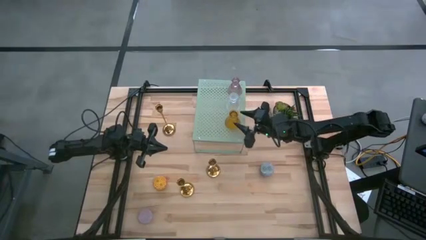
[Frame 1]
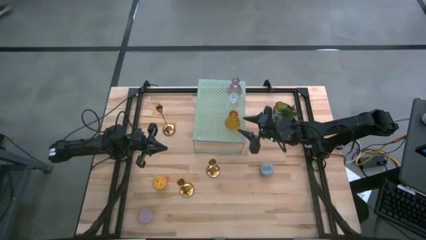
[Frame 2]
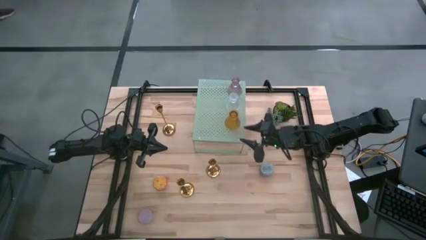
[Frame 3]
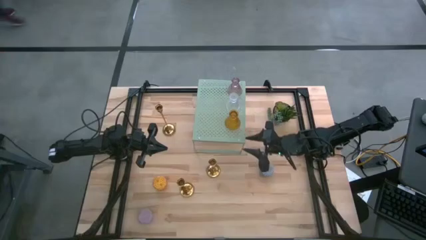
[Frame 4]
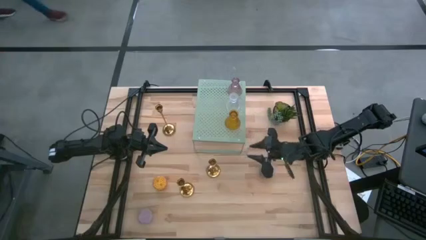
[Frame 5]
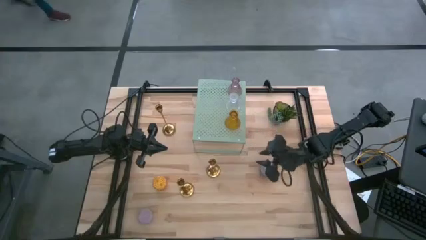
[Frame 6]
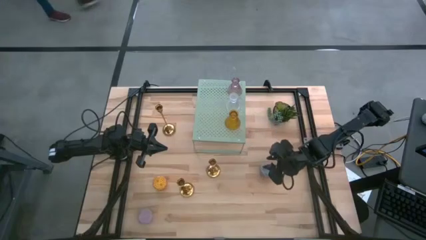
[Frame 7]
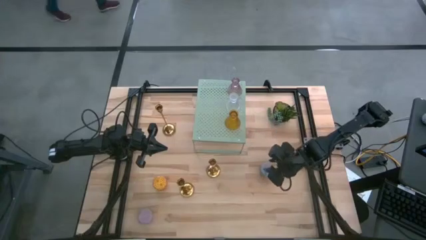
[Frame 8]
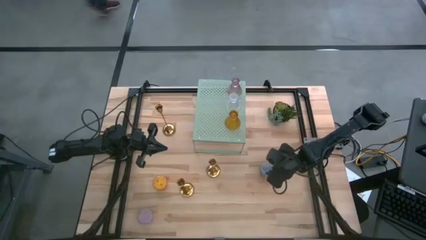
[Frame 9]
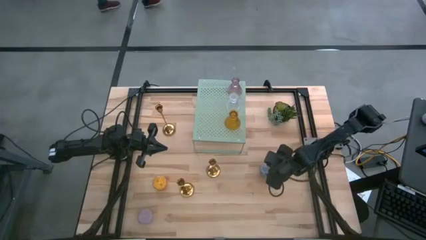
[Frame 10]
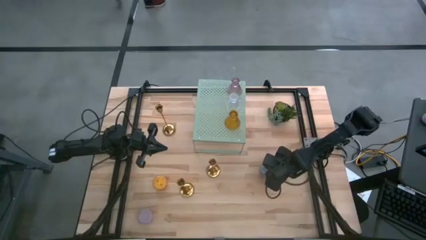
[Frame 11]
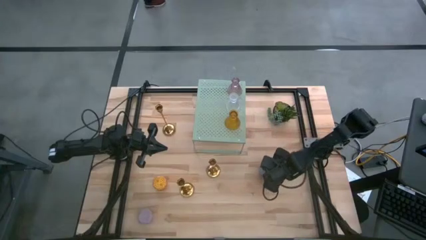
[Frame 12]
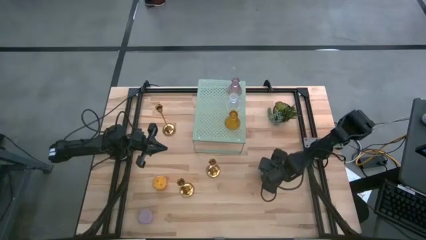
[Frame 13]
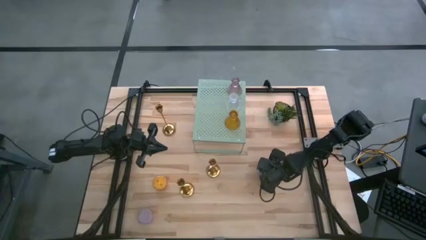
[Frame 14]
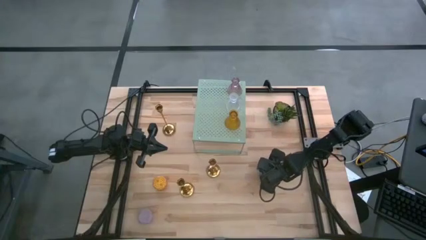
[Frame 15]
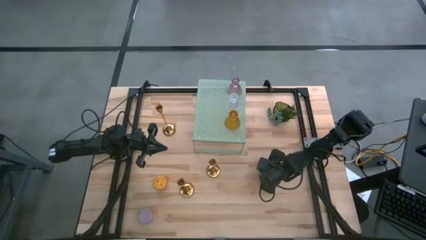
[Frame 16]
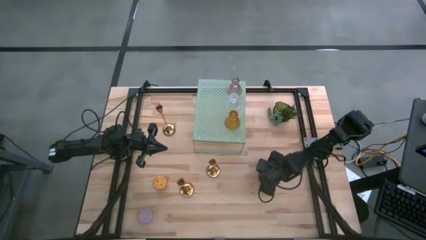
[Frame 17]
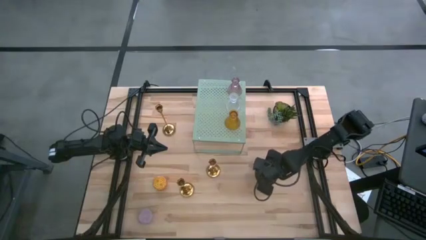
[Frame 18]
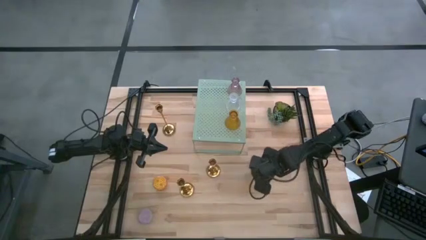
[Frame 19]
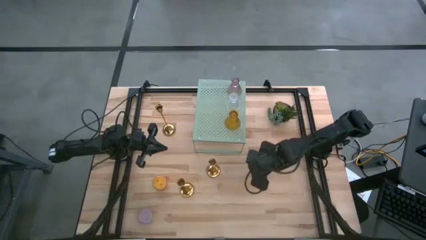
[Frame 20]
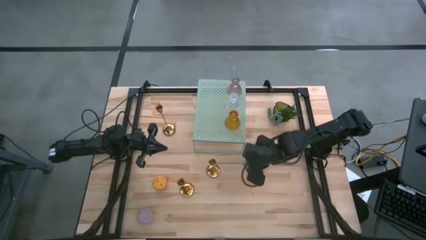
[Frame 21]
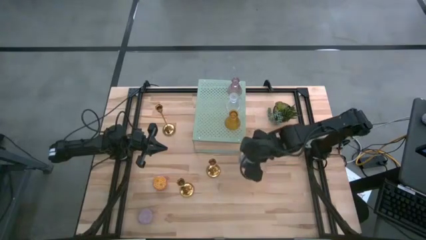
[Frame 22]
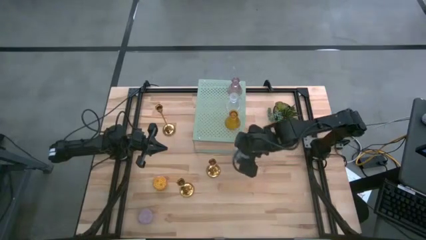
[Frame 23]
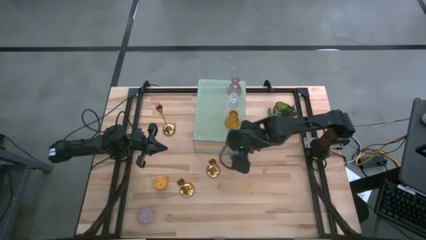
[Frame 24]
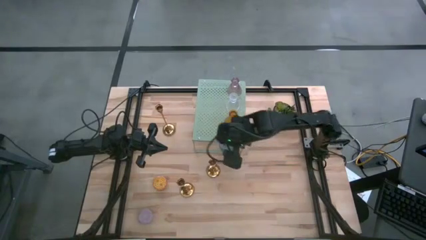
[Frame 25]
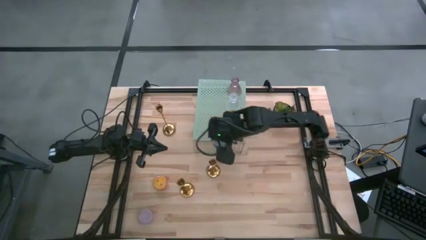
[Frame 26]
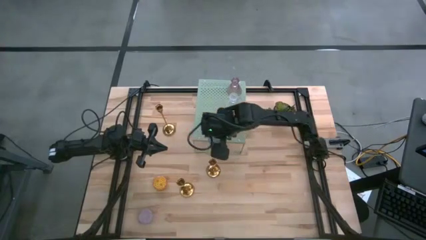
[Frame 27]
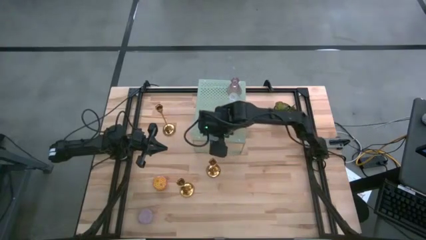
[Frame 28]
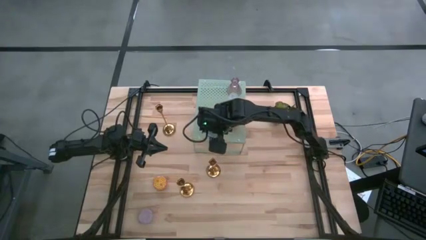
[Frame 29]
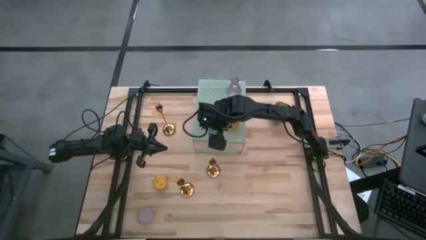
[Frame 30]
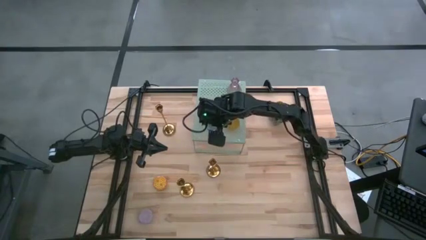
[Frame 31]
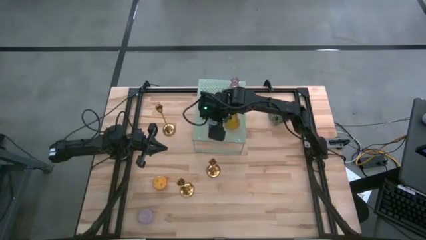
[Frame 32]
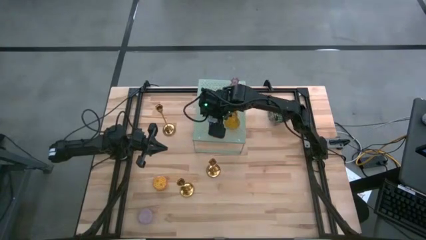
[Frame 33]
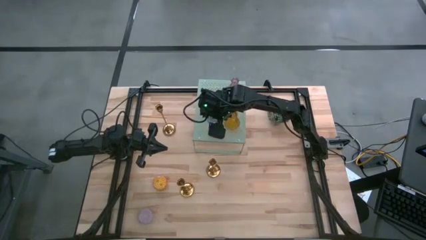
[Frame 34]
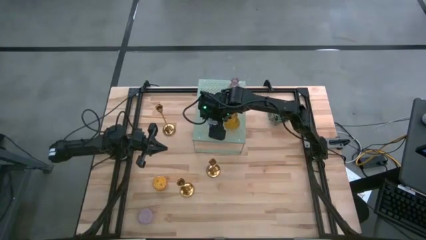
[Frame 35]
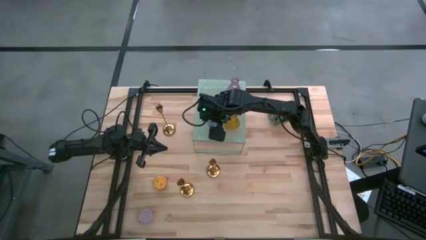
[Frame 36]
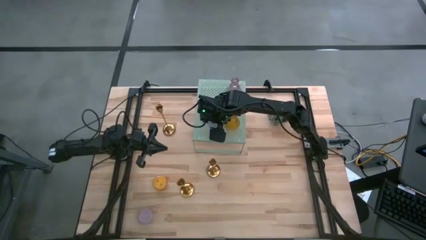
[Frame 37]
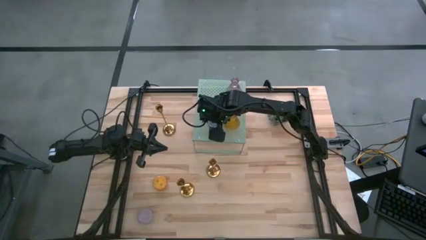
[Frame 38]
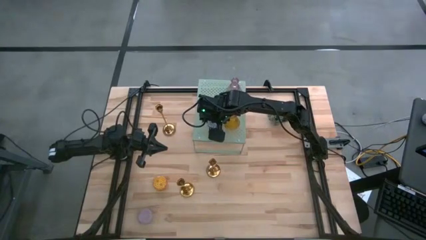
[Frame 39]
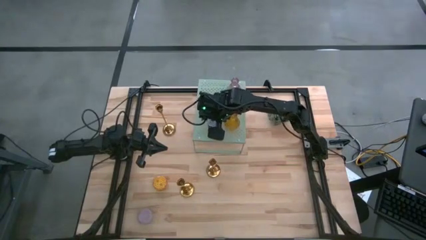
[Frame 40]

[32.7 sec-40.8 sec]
Task: Stock candles on shelf
Put the white green scented candle on the shelf

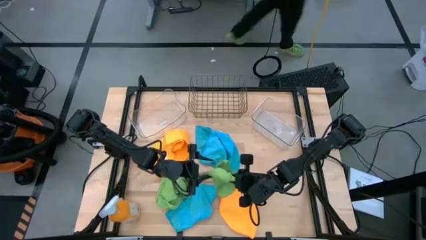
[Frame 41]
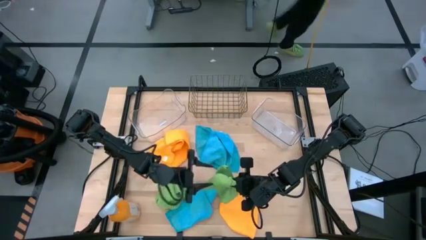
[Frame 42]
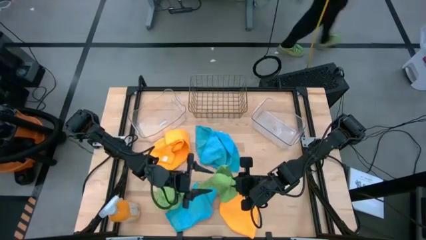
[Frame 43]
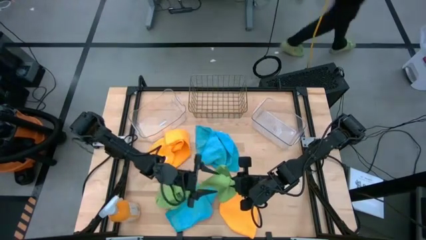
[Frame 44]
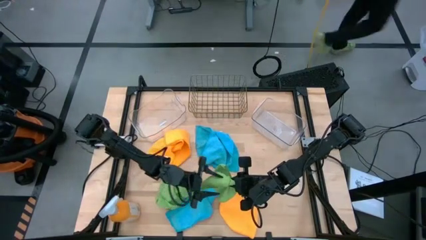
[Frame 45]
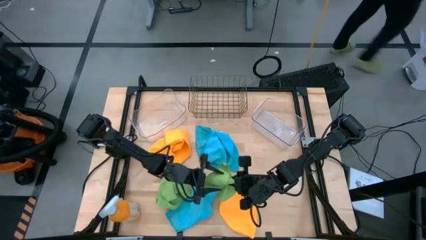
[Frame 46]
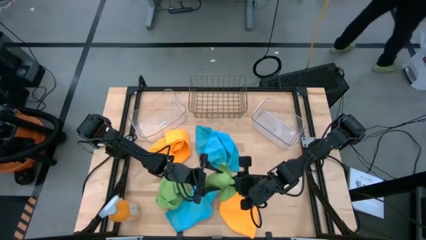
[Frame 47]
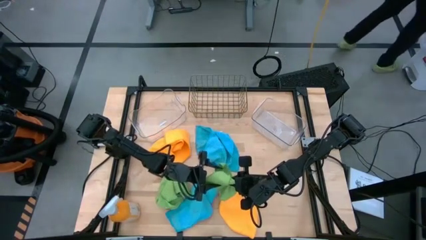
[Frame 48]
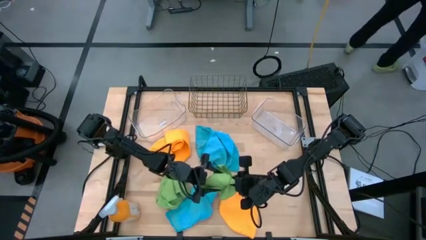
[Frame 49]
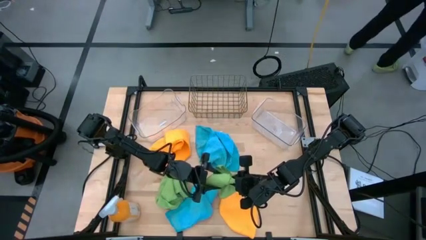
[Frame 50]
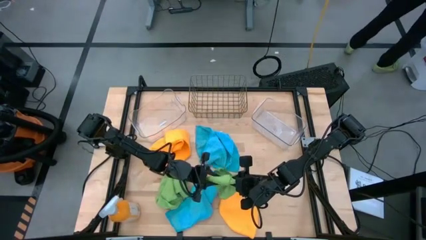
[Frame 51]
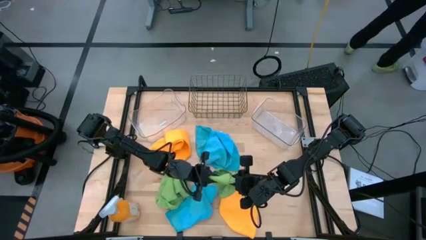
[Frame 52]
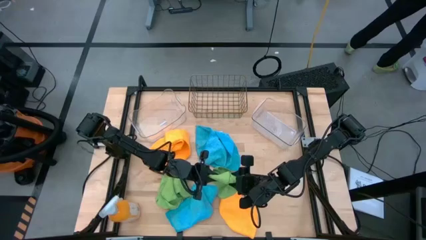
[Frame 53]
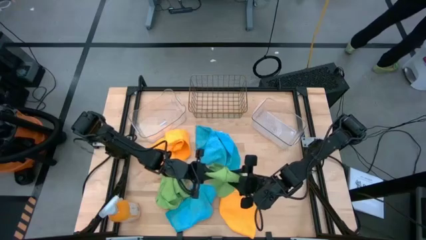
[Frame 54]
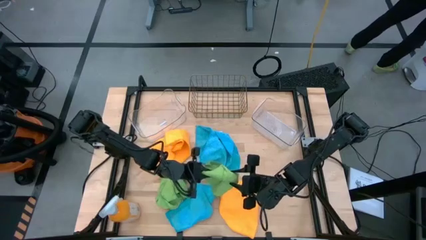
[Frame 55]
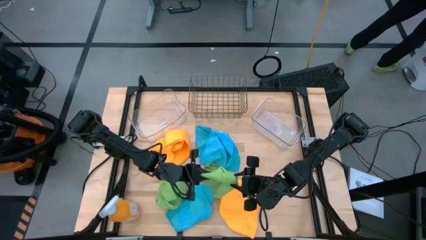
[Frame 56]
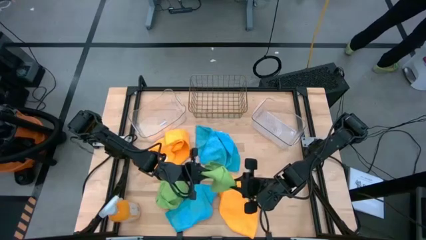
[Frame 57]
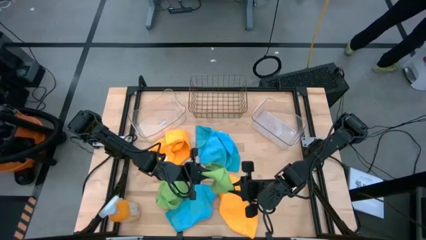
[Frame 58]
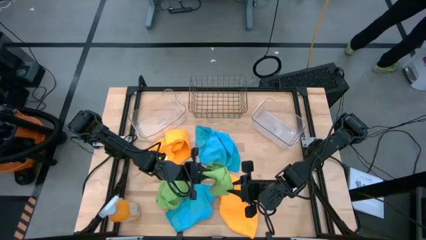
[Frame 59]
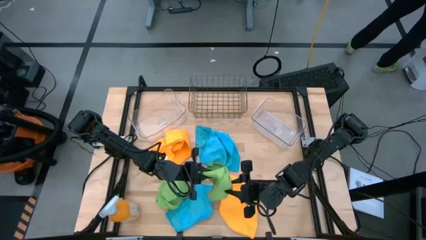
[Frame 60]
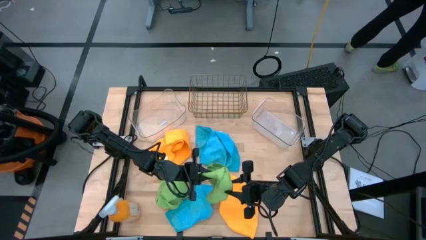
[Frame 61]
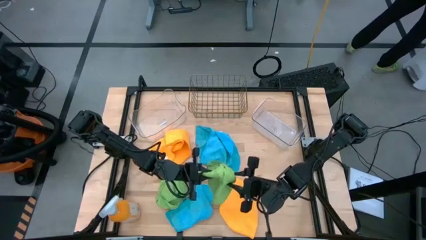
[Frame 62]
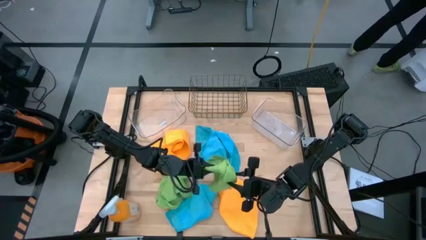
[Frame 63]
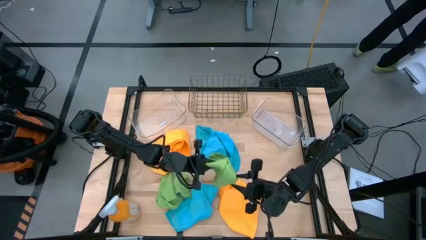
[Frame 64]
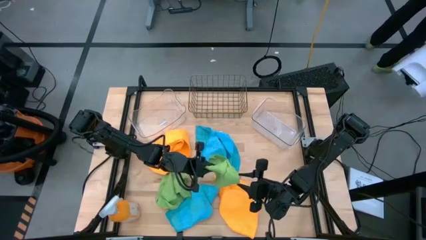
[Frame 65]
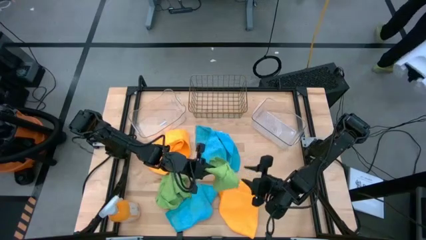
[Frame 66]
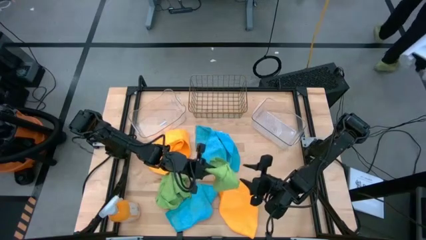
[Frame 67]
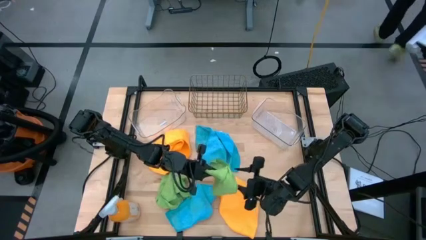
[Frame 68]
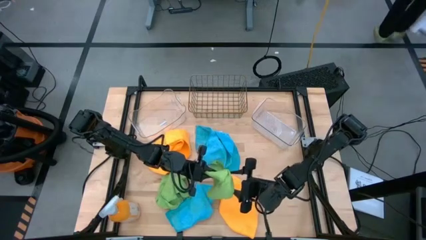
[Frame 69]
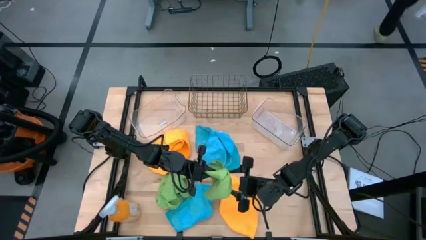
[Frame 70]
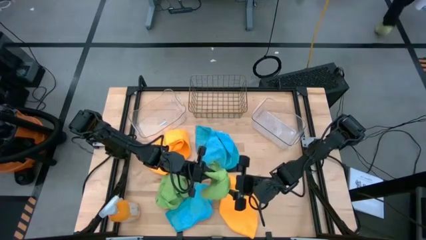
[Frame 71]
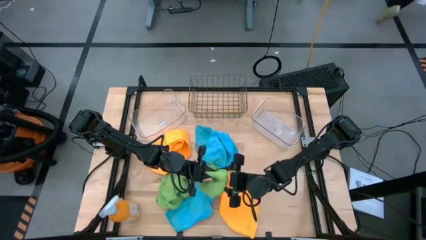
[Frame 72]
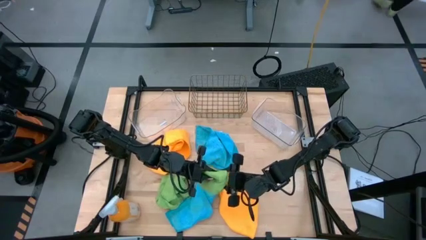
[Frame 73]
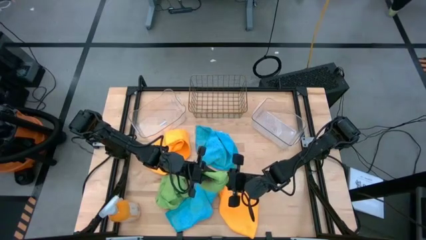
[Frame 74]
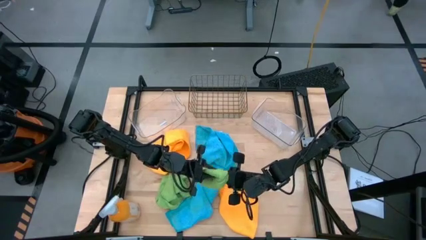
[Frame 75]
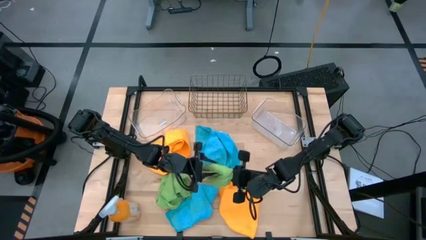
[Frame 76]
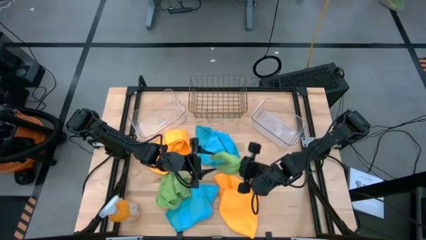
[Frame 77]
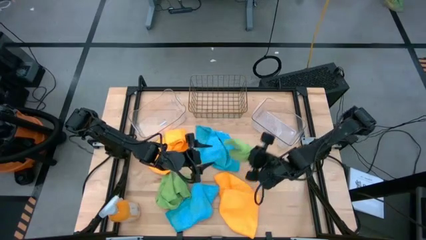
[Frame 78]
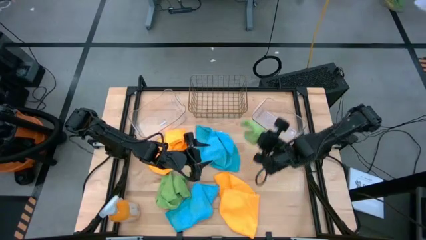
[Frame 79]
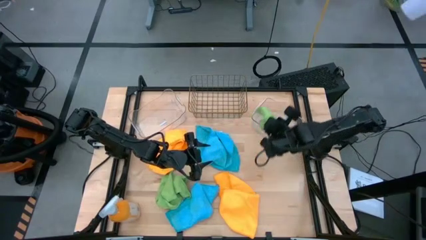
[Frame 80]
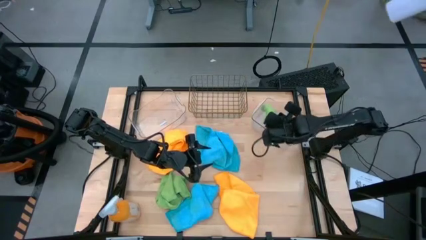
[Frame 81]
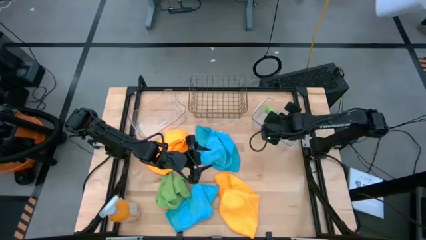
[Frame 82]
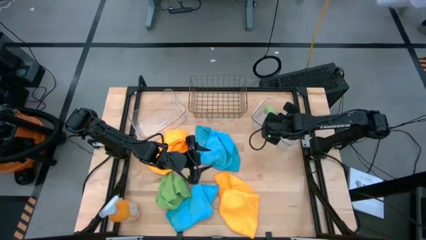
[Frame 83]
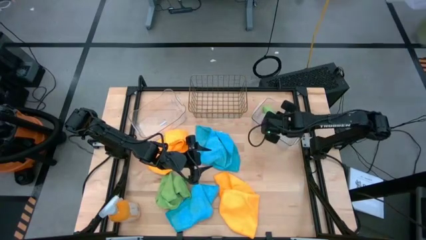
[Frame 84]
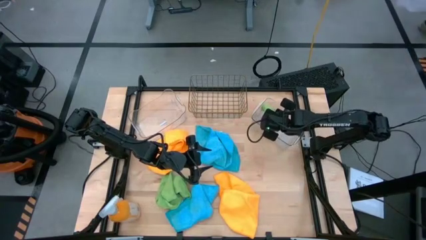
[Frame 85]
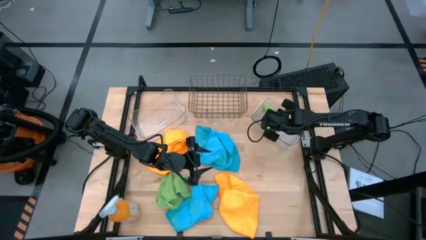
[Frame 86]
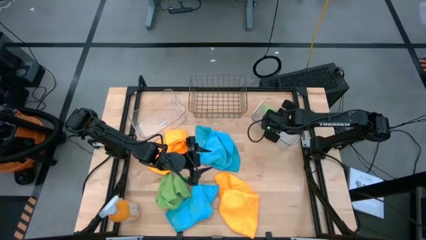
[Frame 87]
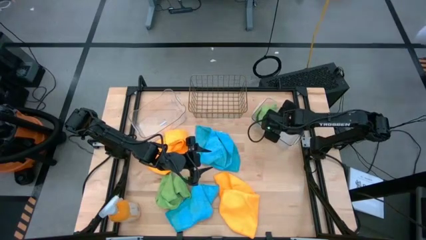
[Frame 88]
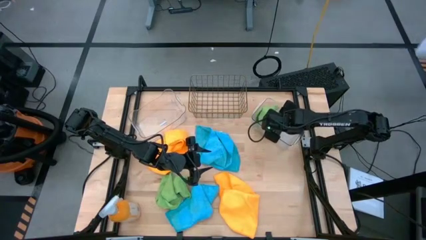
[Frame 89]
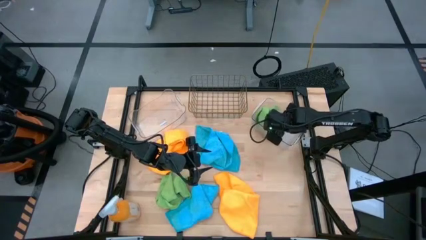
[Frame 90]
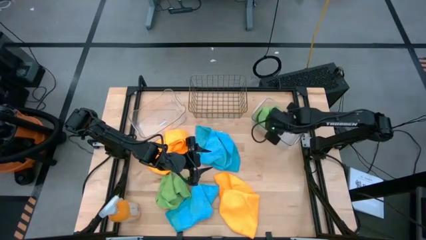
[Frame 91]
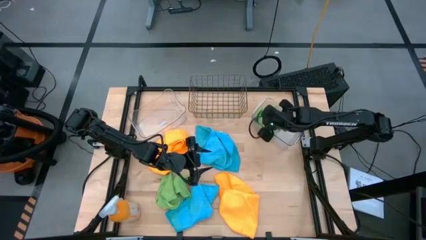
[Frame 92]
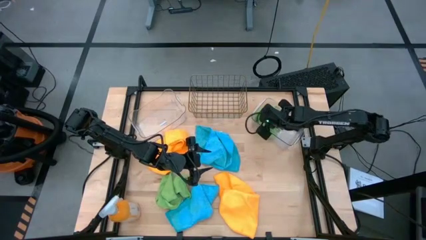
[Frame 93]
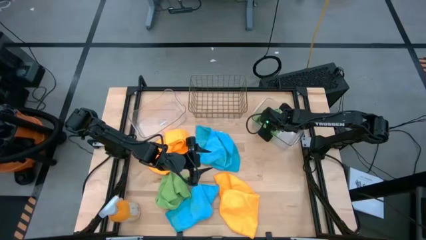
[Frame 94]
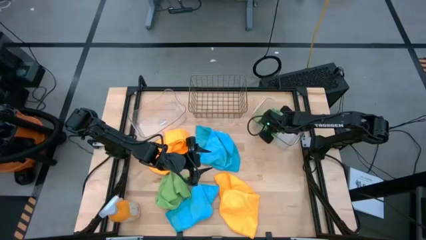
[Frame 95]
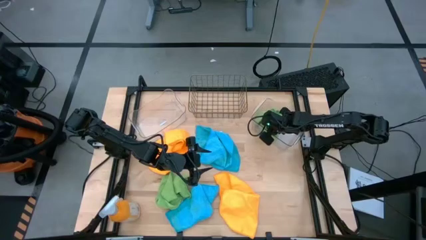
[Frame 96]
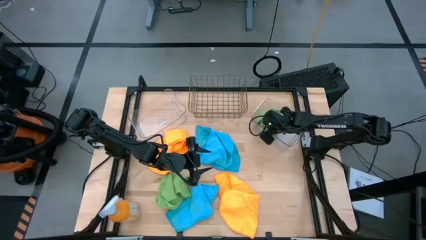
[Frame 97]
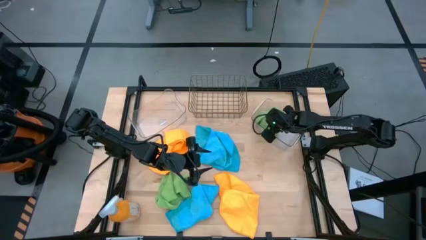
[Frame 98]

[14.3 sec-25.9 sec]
Task: Sort microfiber towel by color & place in baskets
Put the right green towel into the right transparent bin
